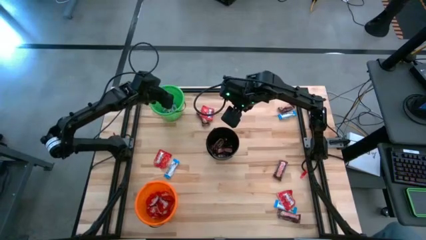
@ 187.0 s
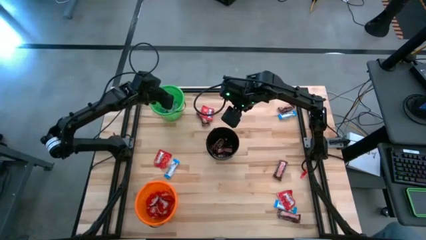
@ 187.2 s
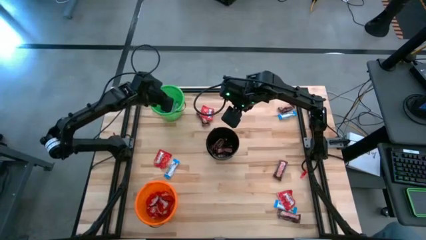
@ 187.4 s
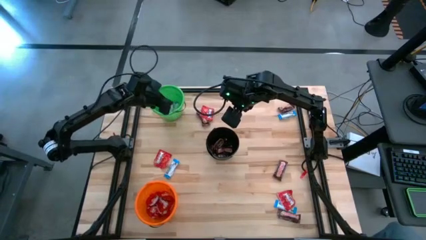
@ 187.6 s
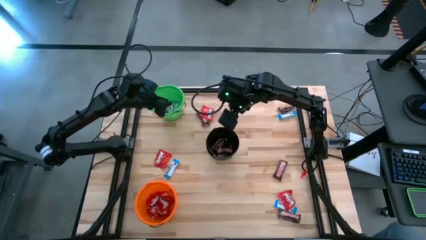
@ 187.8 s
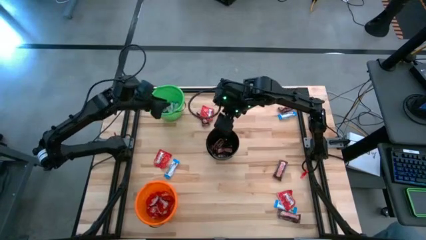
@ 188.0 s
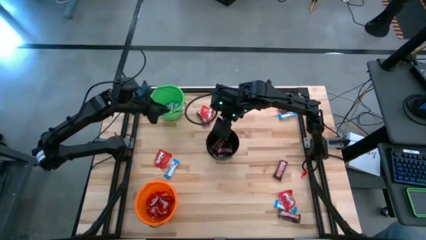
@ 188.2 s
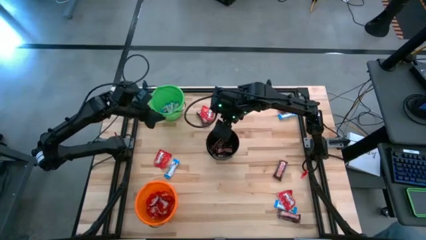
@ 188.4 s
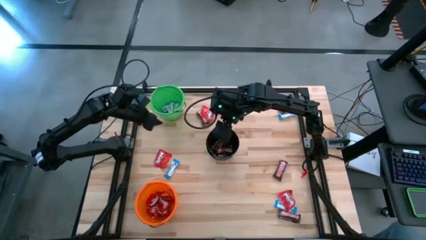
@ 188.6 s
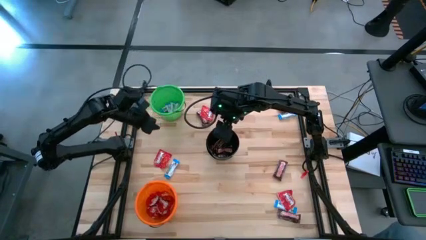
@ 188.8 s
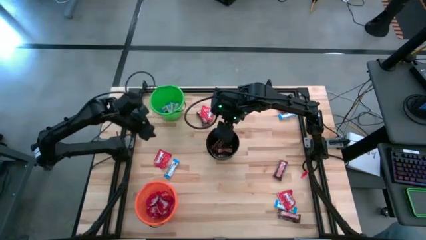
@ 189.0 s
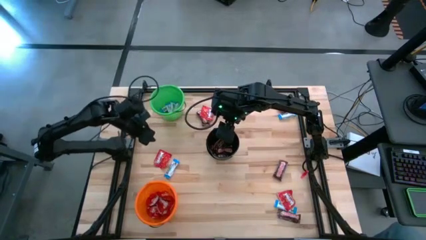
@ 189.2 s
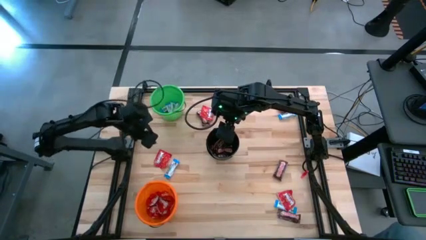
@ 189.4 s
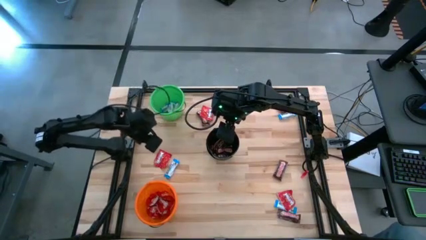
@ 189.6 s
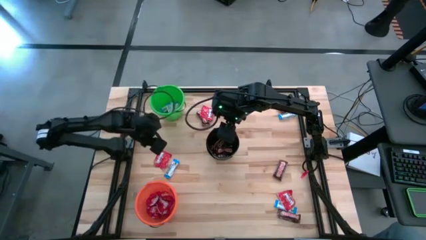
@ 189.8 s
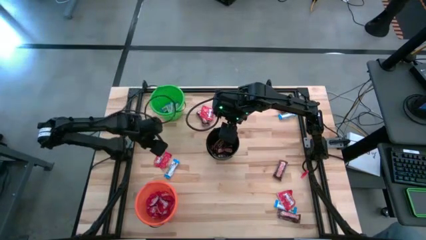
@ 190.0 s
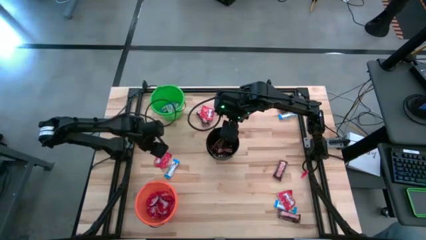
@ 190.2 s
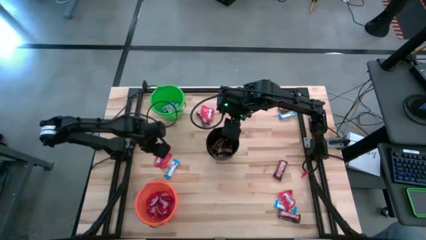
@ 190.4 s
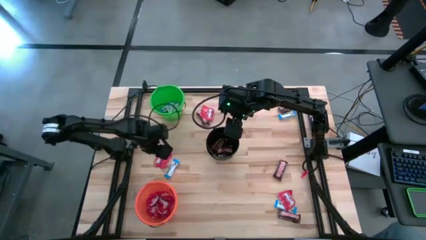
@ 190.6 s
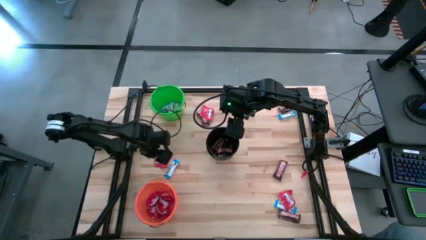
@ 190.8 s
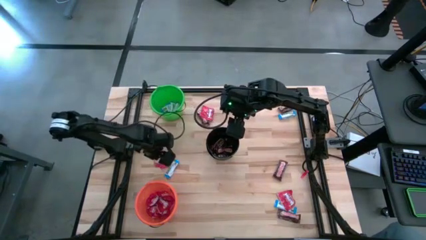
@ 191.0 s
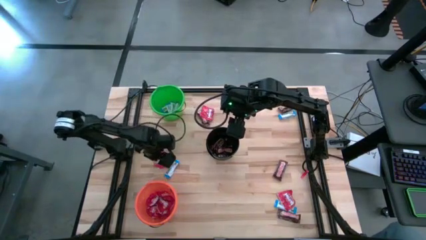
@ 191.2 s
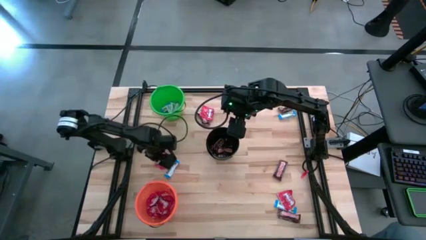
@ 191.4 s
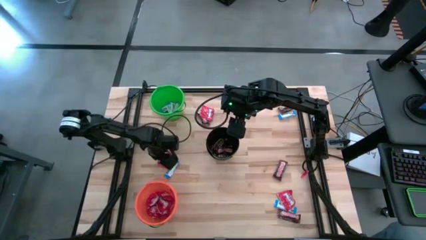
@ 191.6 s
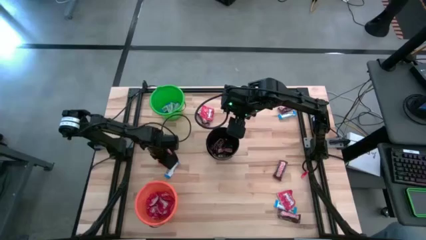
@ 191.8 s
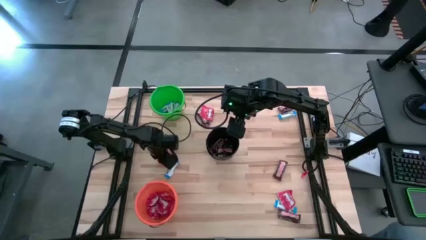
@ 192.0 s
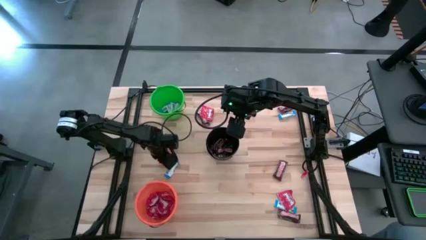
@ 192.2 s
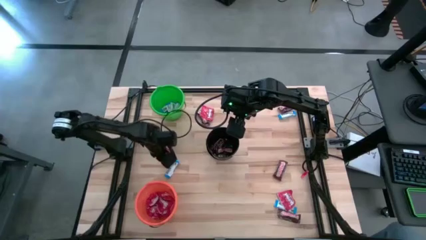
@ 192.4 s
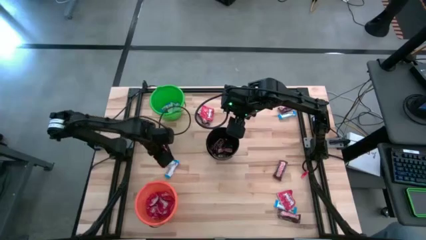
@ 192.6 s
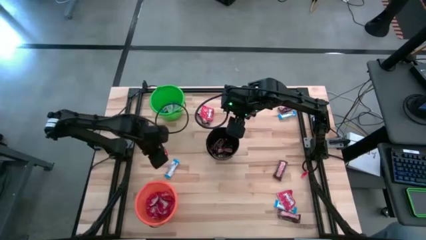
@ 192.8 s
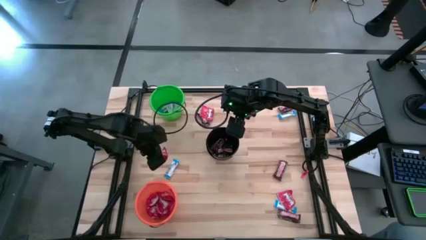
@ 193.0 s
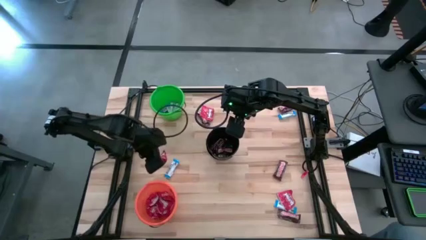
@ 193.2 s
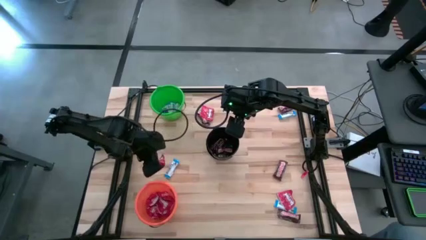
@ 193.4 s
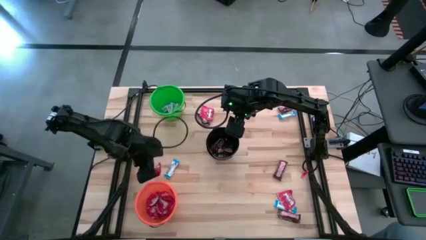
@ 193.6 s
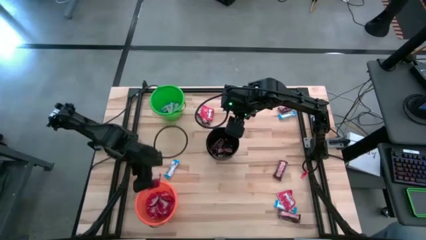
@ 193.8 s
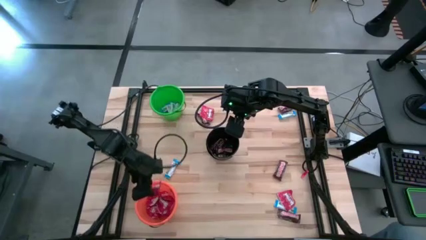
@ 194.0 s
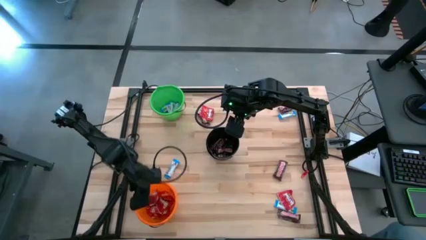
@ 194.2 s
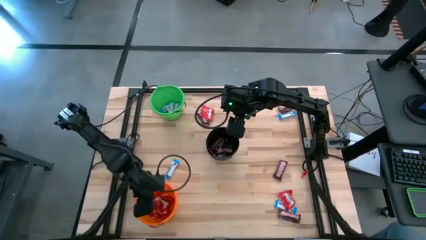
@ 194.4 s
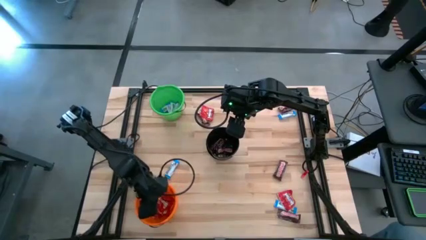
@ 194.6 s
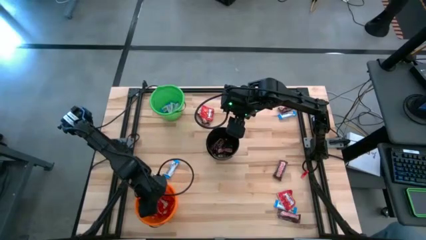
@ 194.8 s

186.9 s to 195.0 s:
Task: Sort candy
Put the left red candy pack into the orange bucket

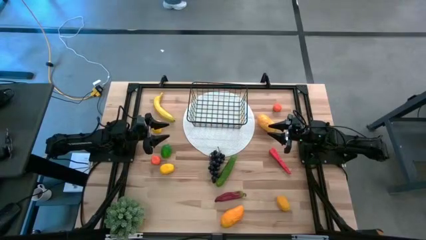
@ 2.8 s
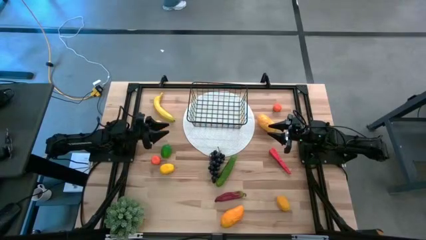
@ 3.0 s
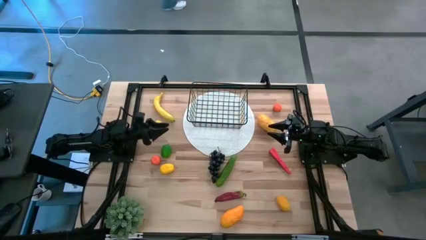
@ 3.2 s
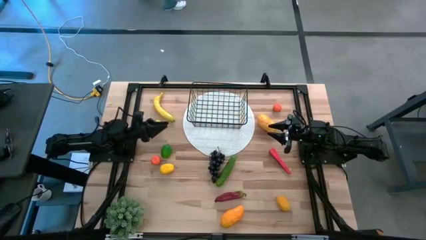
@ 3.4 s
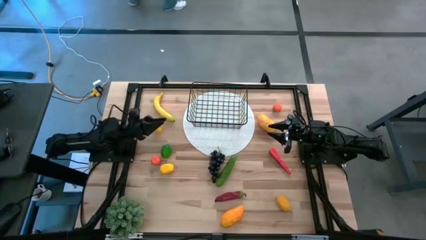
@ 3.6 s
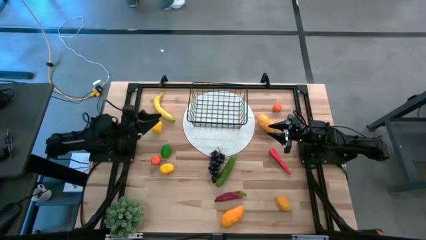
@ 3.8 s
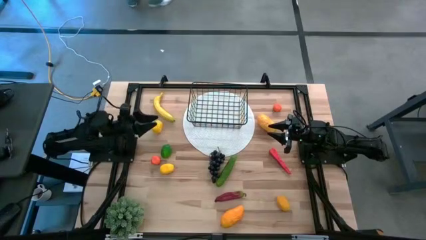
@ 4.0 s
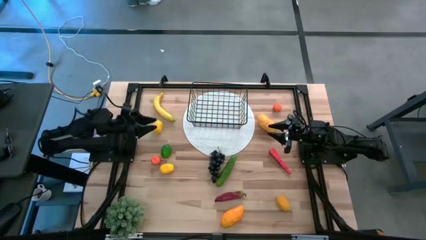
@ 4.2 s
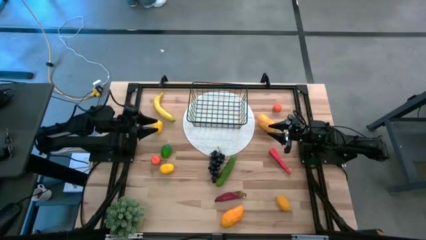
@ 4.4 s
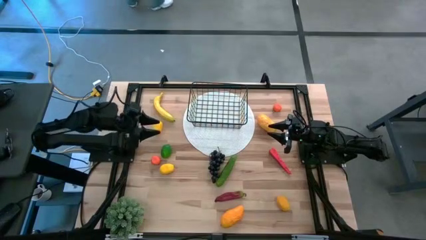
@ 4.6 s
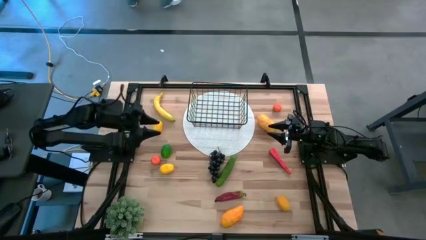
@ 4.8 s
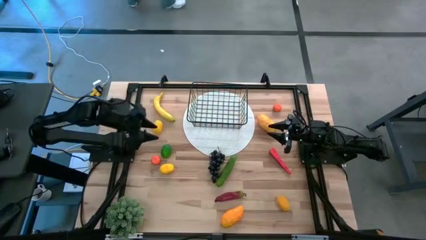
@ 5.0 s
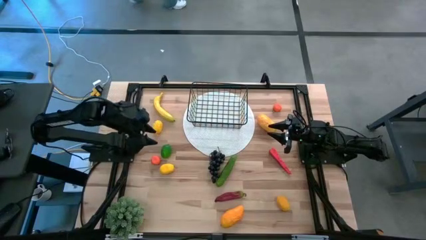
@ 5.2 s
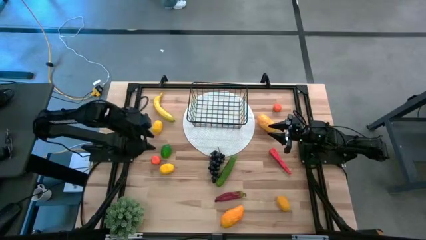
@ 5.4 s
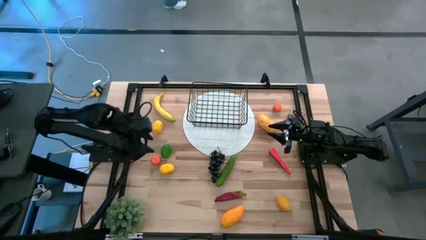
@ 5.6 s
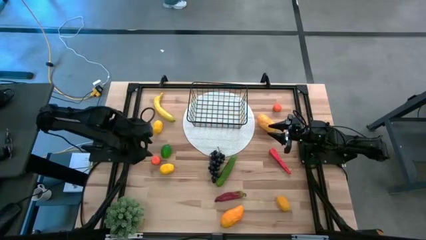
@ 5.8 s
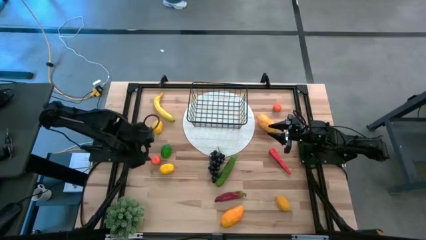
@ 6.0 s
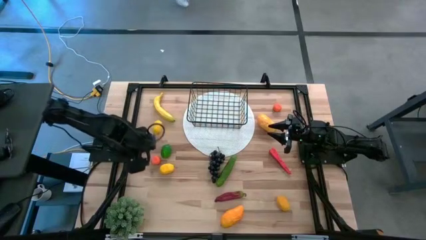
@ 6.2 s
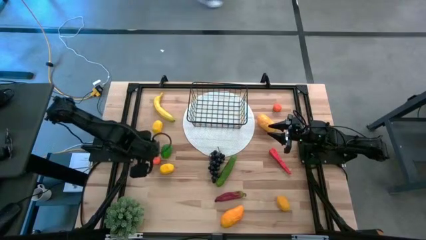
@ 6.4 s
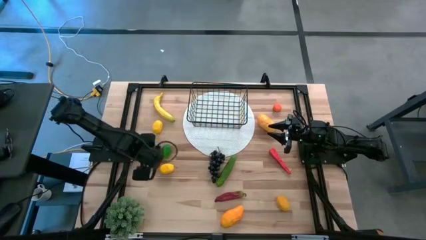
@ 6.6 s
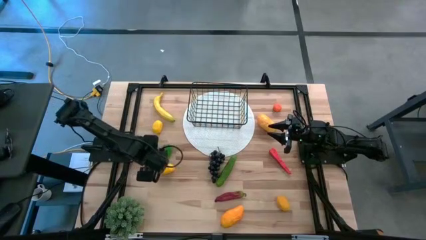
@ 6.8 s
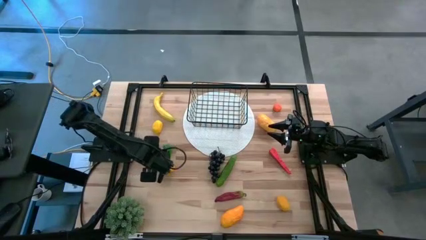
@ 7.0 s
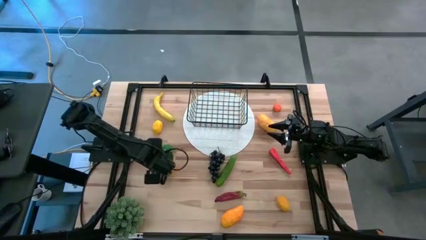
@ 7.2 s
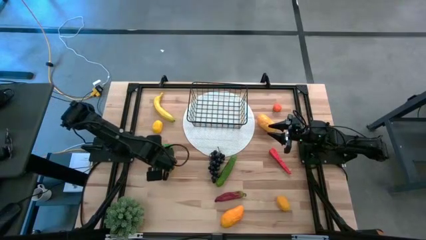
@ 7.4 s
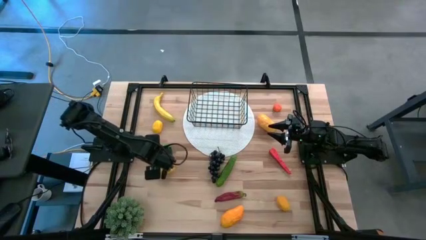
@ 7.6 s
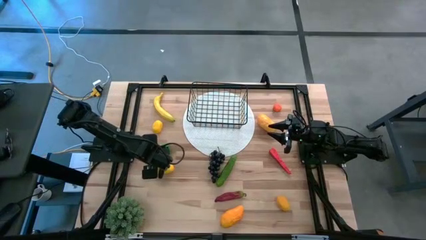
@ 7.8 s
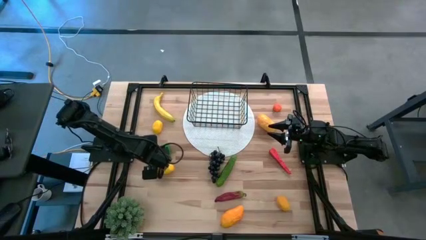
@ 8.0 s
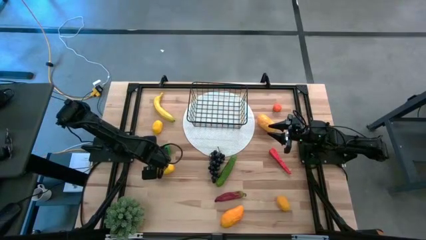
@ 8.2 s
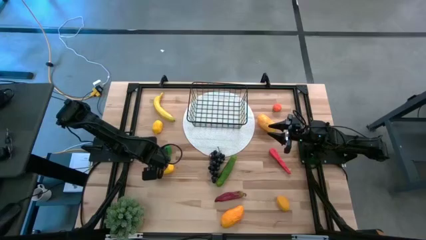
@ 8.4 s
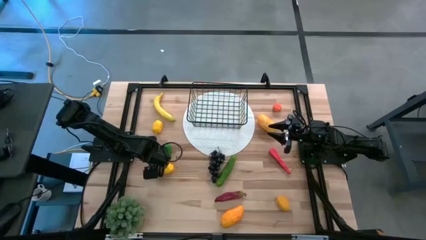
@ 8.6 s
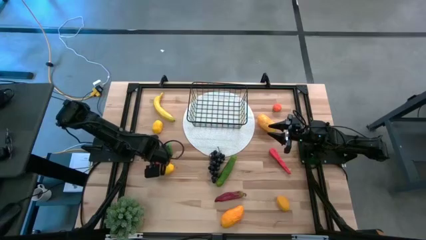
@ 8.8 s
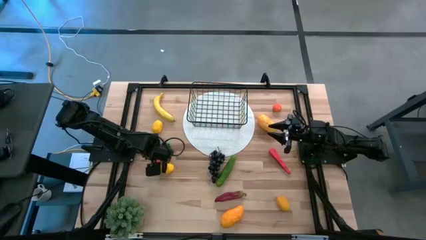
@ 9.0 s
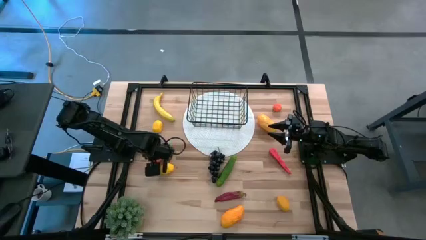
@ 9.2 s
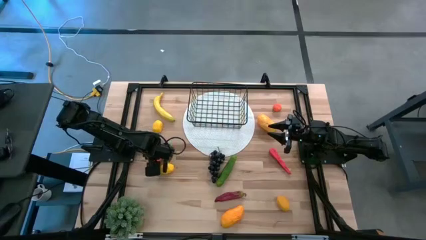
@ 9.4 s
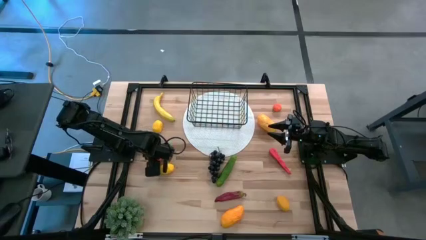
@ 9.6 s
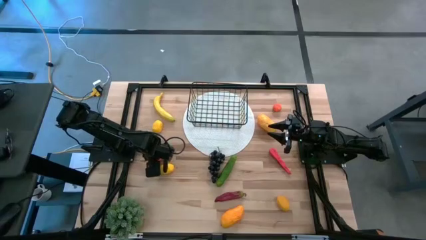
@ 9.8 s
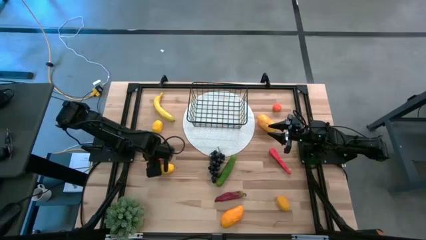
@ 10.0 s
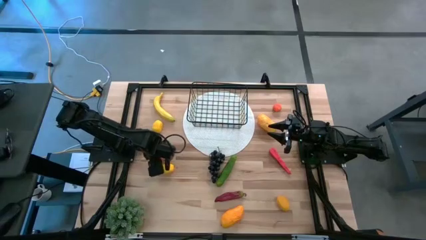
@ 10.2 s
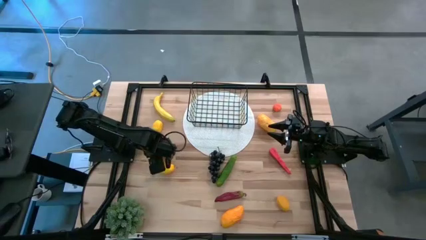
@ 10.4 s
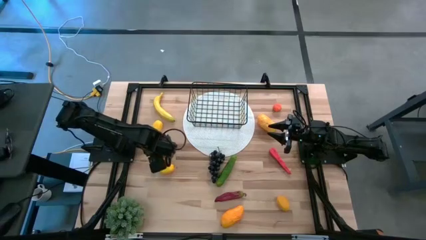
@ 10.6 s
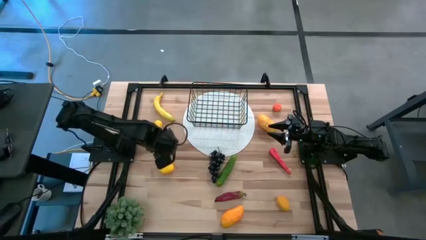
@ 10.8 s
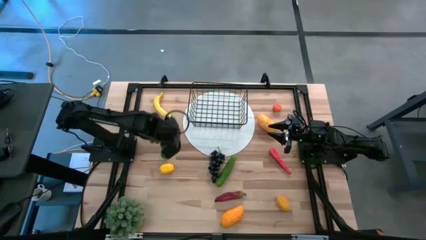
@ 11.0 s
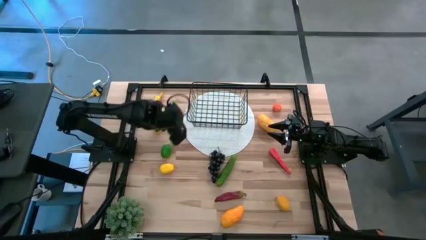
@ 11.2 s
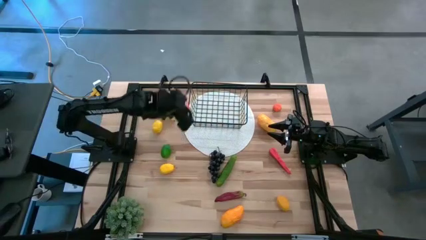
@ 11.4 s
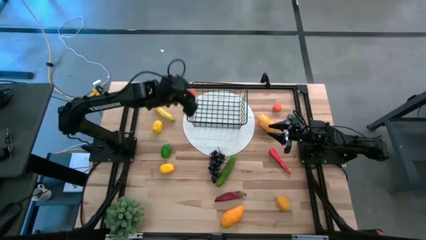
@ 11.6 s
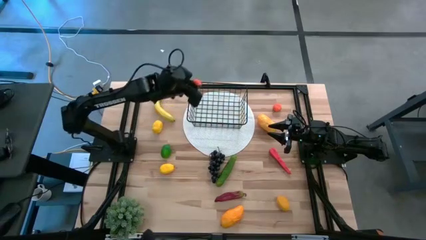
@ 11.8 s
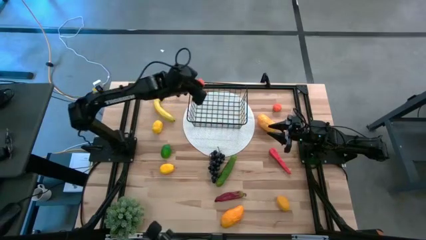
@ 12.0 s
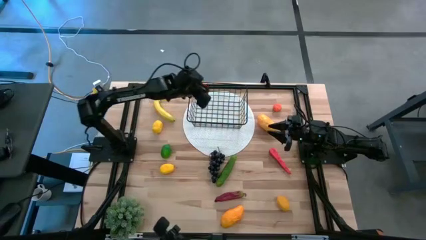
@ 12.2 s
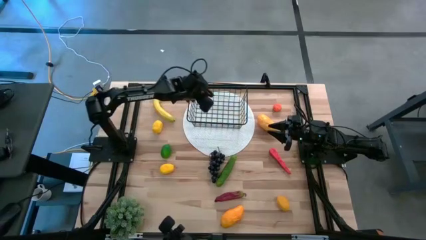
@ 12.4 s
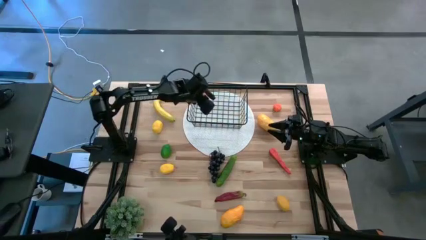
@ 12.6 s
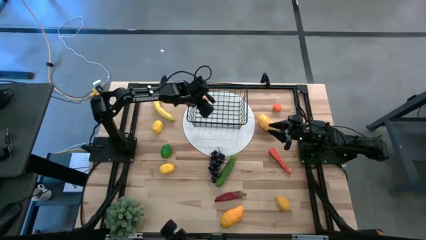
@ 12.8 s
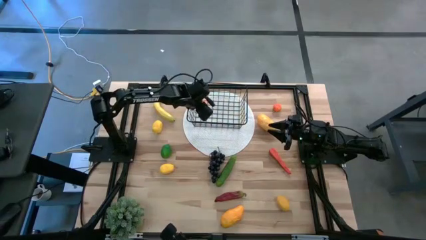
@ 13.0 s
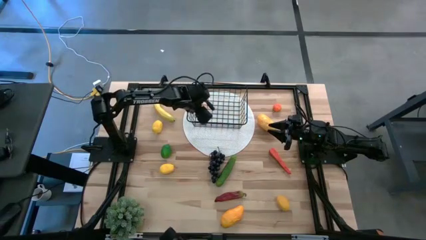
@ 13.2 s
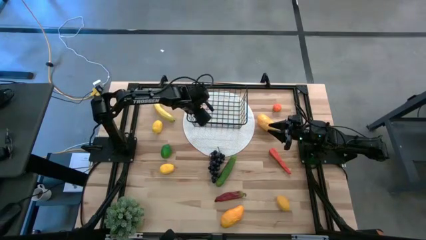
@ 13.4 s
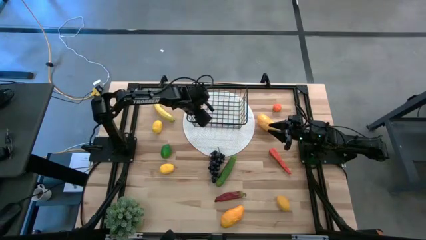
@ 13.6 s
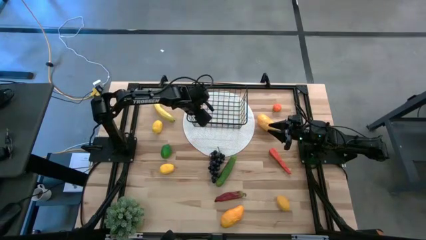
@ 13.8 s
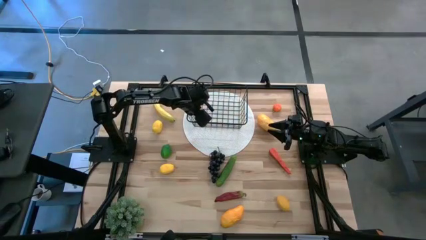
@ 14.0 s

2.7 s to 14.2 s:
Task: Build produce basket
Put the bottom orange into the black wire basket
